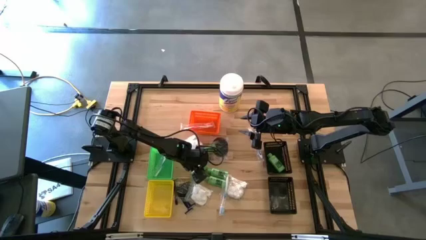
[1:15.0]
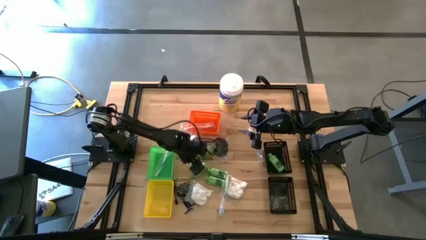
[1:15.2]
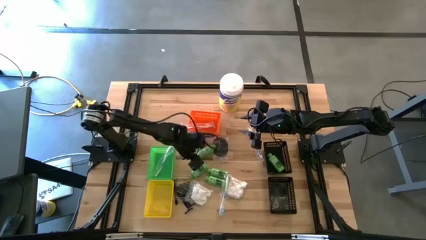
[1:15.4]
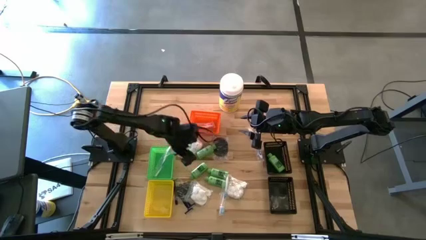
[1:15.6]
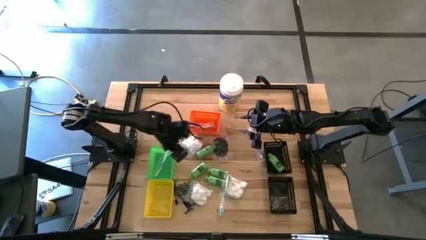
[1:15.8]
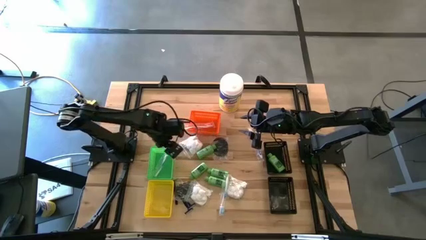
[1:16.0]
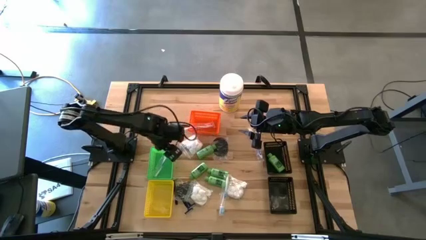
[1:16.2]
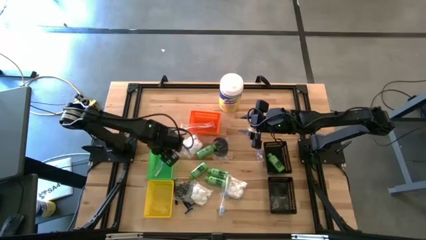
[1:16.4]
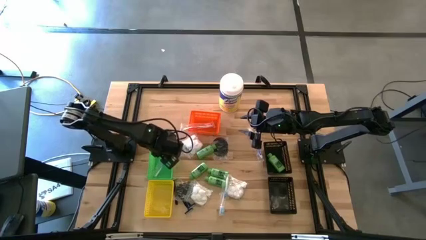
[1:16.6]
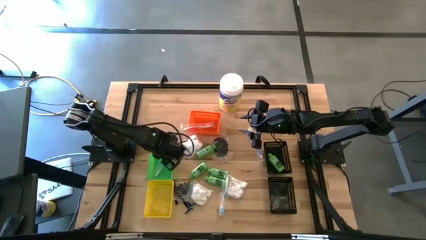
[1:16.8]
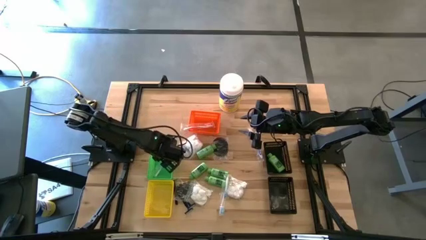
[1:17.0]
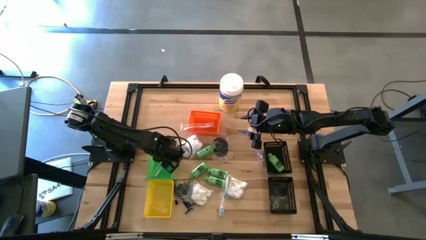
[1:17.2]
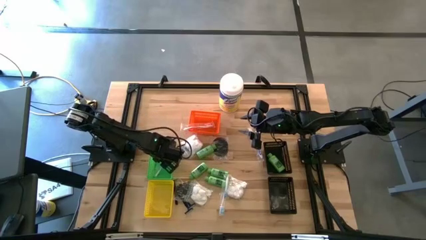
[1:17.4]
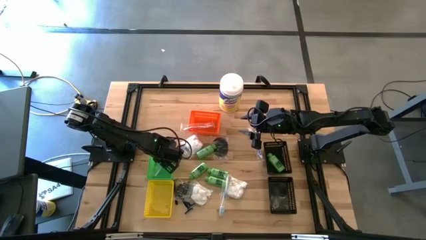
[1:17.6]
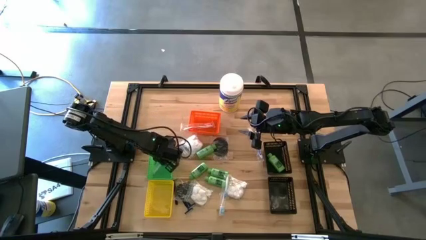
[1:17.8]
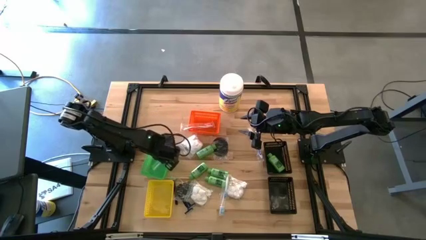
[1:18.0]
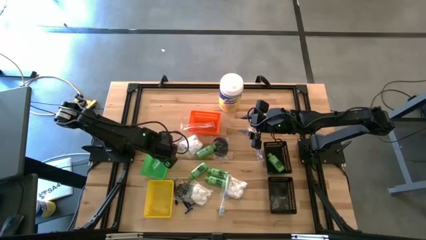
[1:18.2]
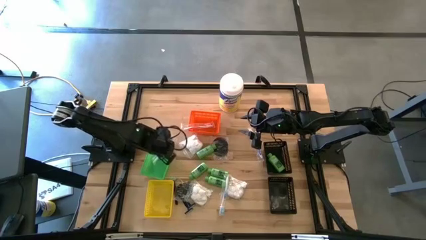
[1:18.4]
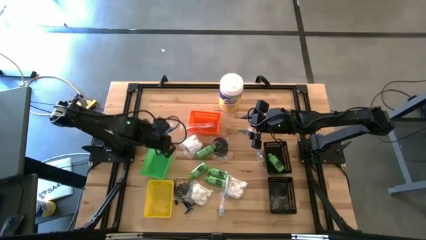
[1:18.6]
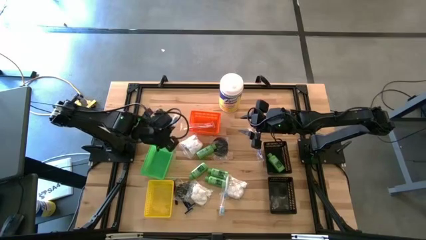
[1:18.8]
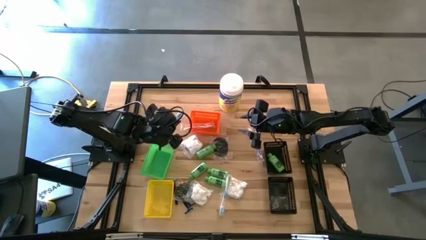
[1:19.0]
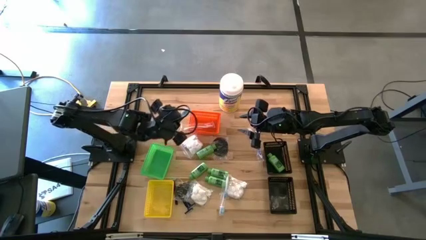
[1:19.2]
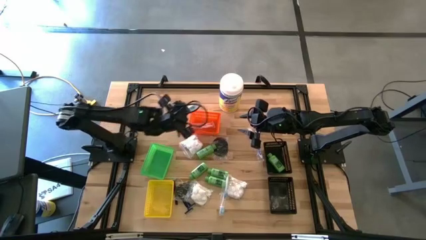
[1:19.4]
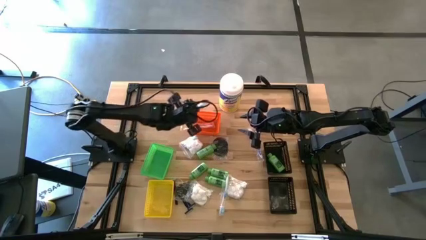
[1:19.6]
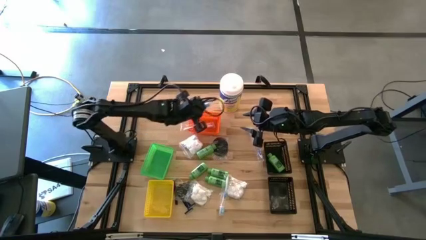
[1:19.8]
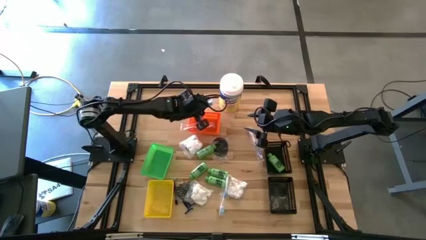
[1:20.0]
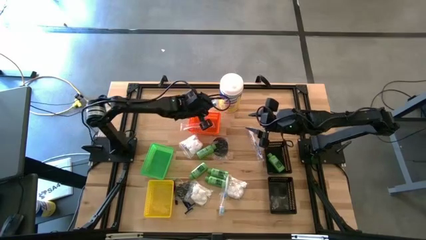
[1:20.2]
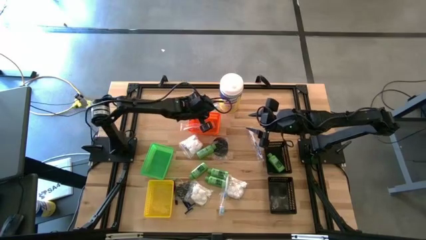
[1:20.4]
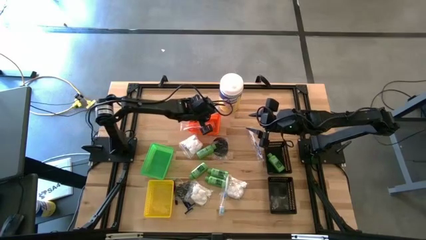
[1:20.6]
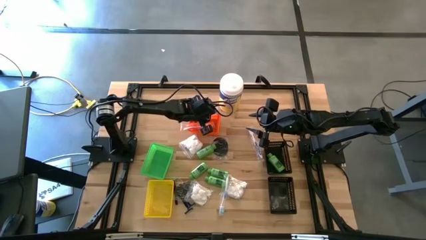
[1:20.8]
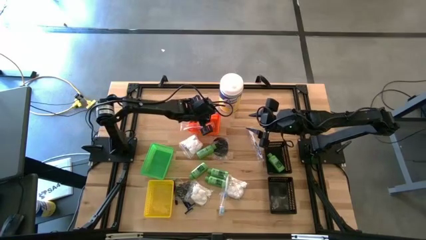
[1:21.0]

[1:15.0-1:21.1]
Task: Pick & Place Travel size toiletries
Put the blue toothbrush into the orange bin

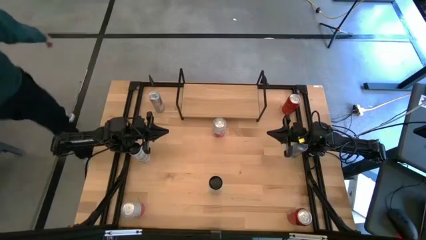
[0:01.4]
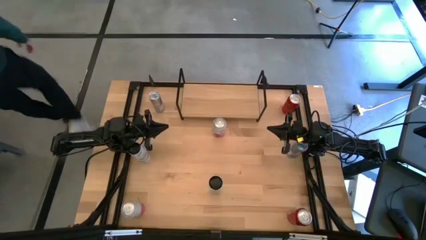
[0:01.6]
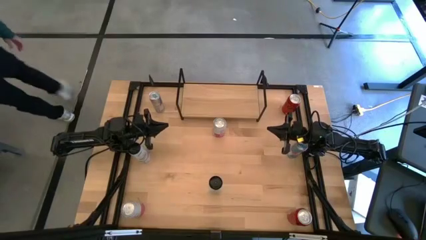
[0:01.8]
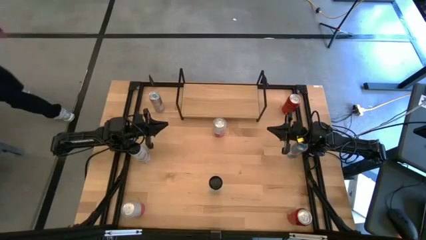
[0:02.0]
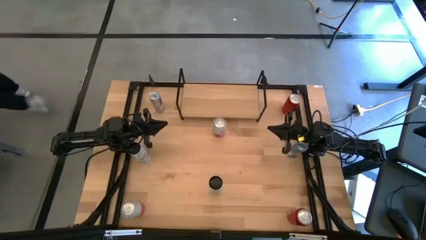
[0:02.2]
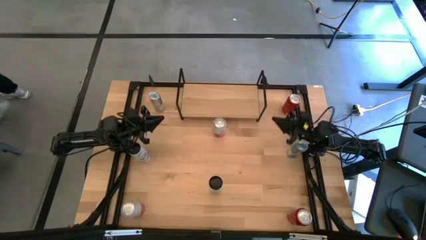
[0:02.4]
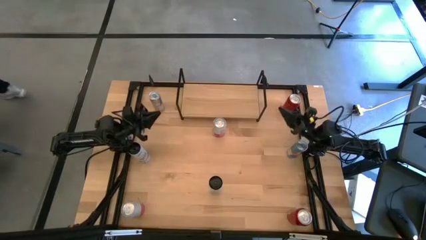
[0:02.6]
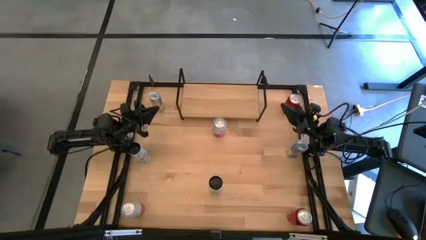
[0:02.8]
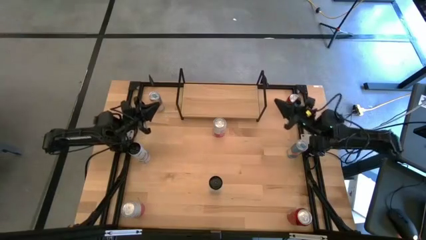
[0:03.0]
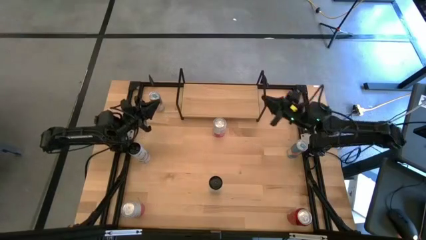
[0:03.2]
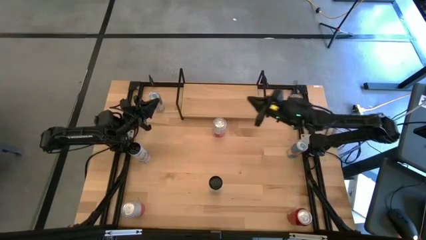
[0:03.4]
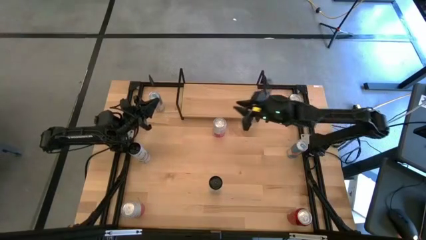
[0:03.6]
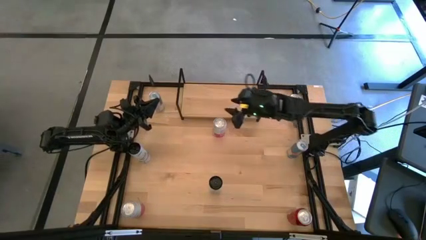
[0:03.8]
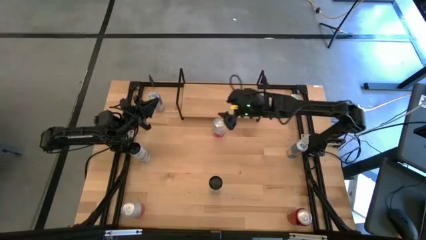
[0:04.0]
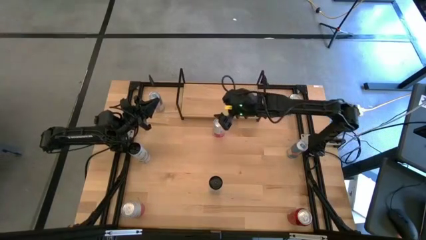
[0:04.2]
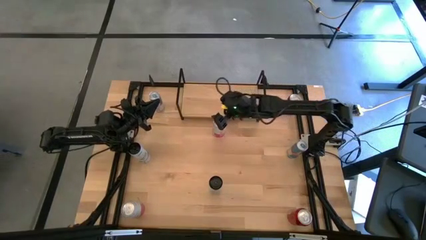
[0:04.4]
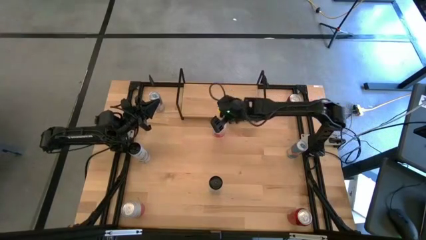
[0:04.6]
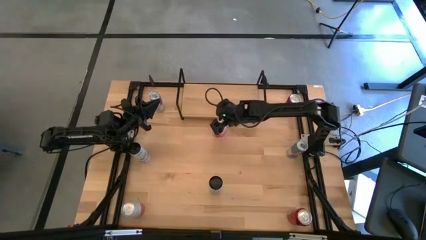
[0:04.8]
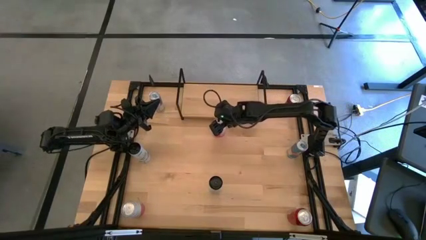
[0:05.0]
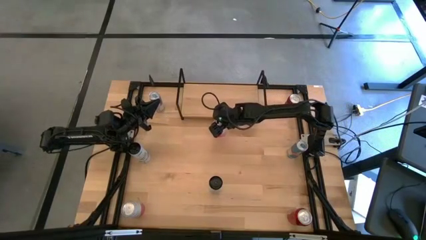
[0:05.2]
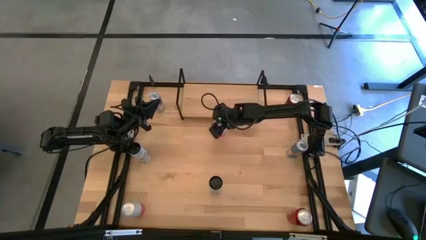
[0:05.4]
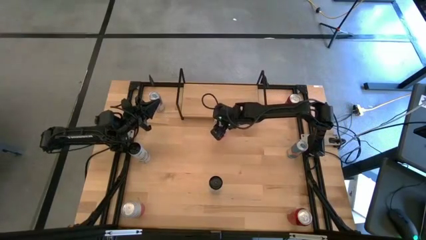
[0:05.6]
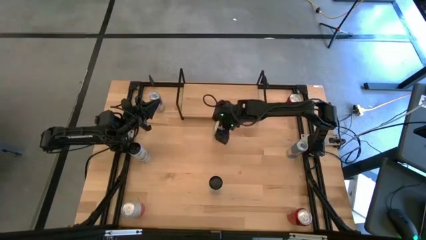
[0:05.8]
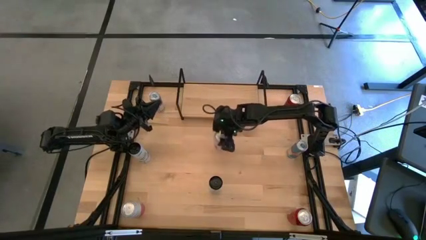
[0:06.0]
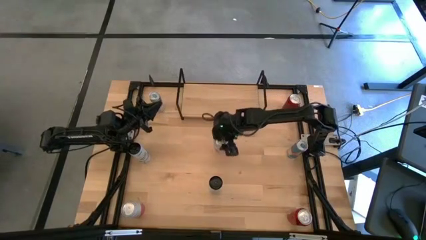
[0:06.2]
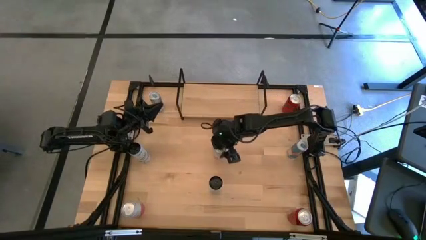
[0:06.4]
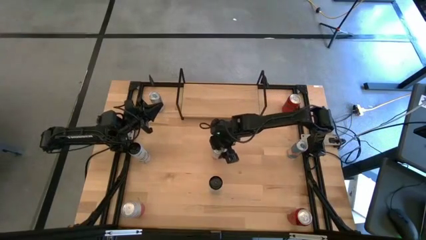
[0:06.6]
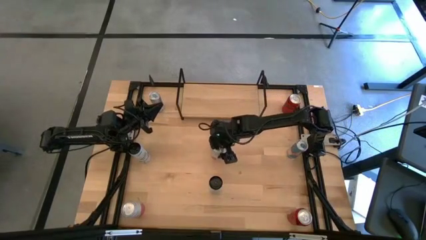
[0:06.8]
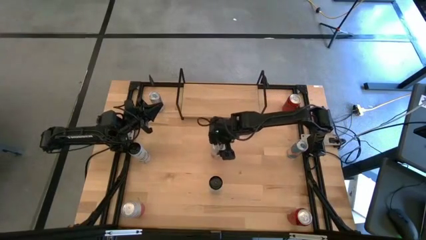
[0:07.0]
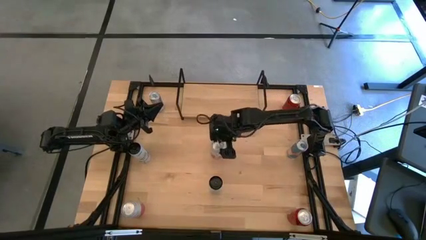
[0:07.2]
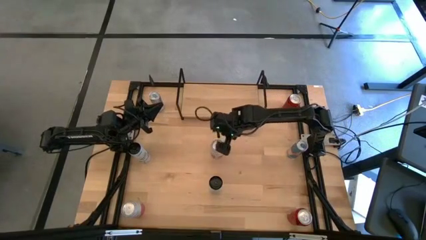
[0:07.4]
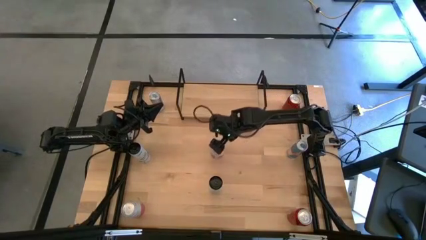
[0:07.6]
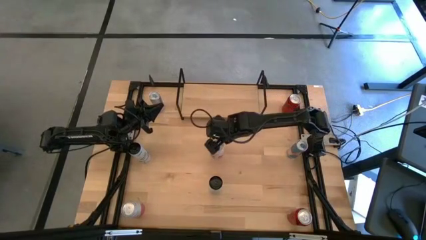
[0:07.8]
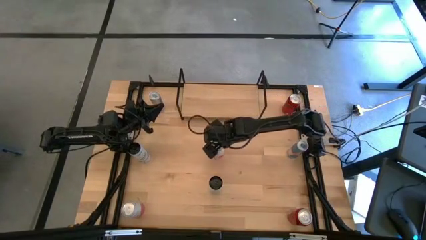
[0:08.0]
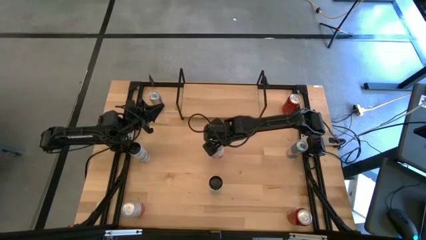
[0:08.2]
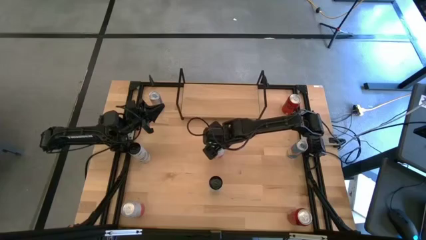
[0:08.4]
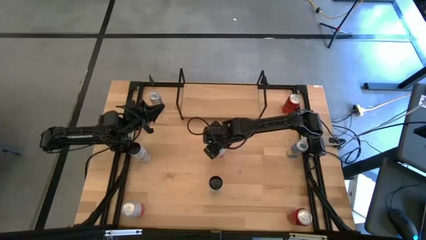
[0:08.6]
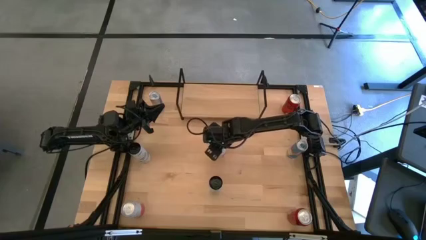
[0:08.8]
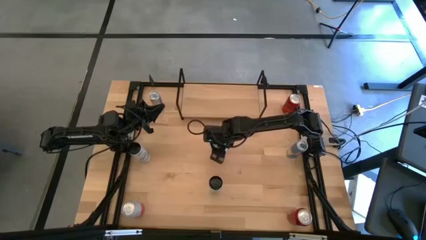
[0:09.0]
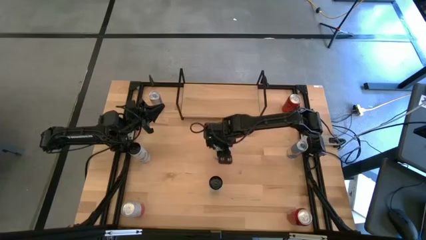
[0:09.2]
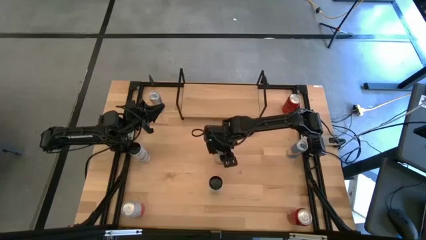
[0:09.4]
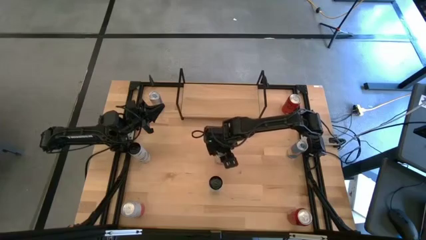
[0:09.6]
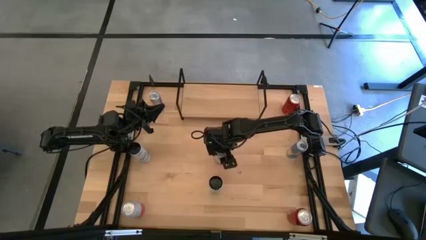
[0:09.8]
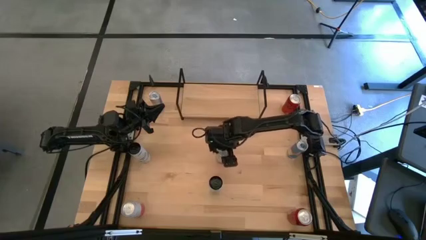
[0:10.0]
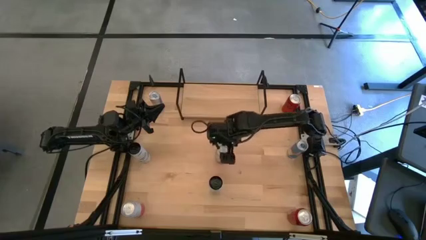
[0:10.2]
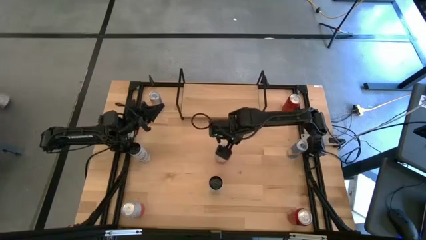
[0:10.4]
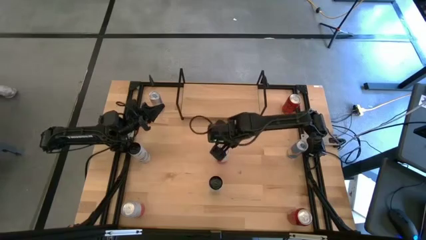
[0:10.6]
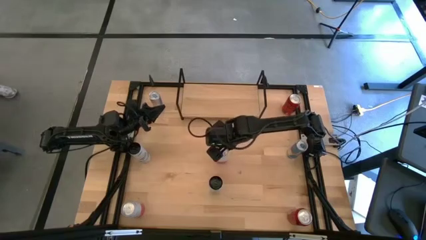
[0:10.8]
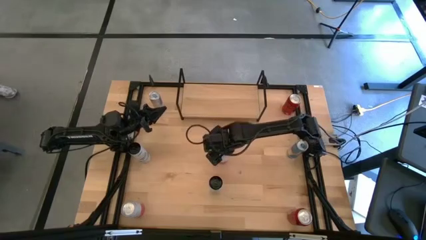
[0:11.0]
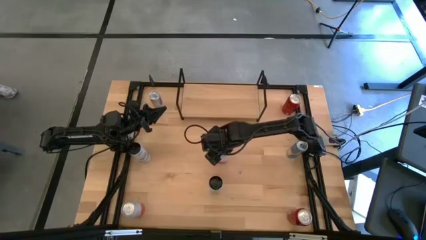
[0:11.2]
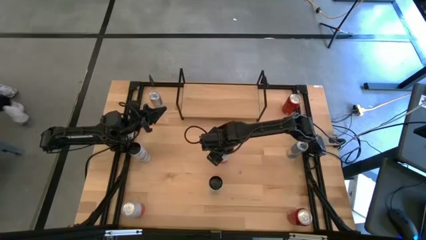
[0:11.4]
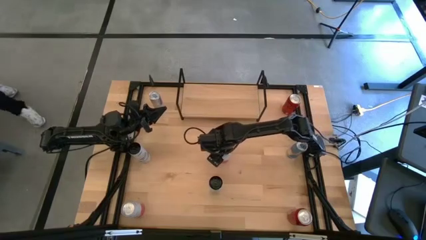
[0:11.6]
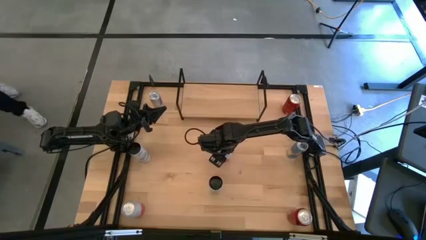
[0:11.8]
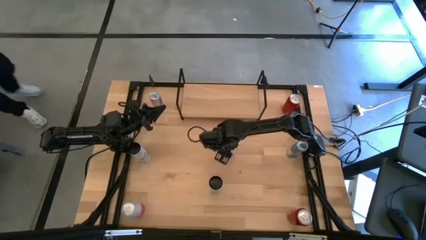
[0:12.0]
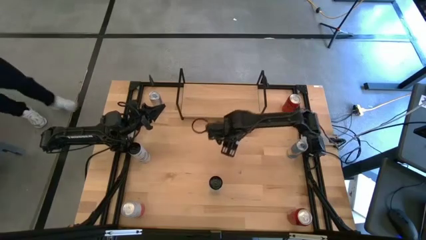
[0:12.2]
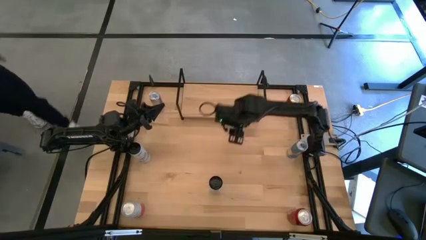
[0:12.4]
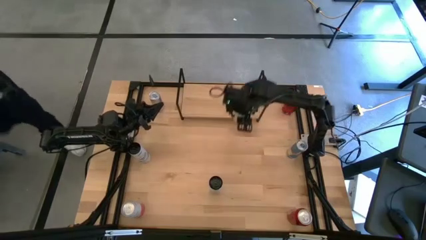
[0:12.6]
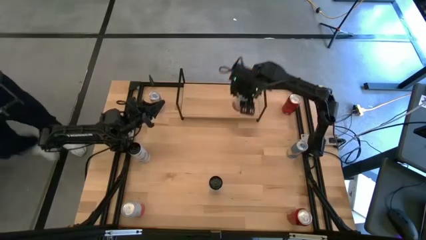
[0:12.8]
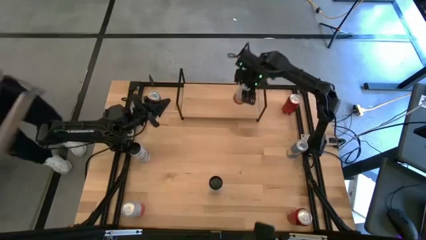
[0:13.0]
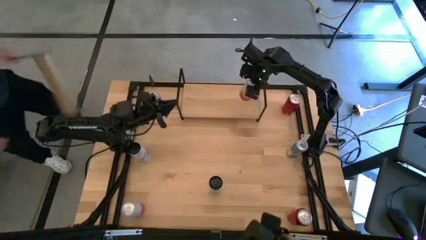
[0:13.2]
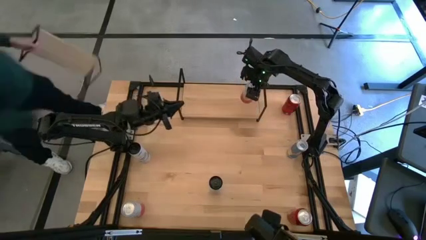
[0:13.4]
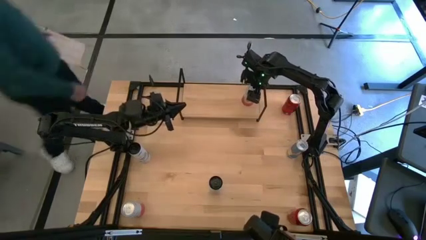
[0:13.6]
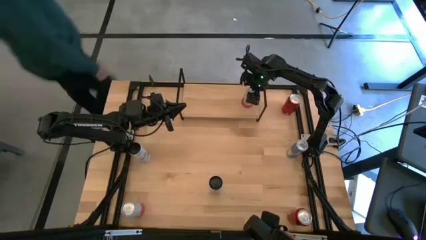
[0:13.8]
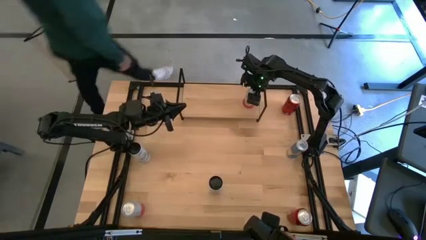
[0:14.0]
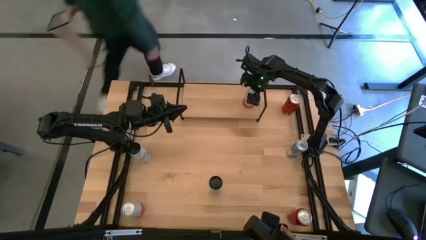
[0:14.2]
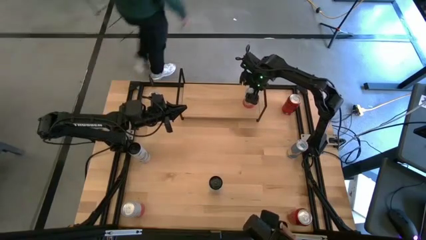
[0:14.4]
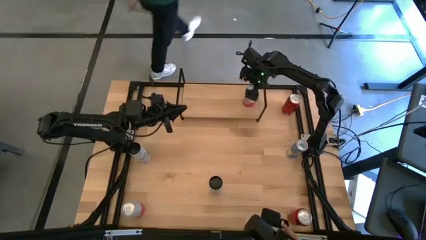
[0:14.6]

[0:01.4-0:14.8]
Task: Place canned beverage on shelf
Put the top pink soda can on the shelf
